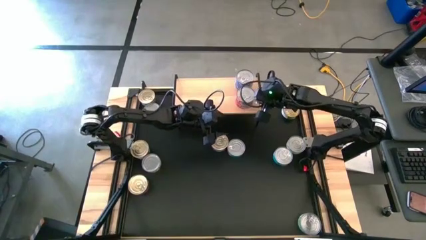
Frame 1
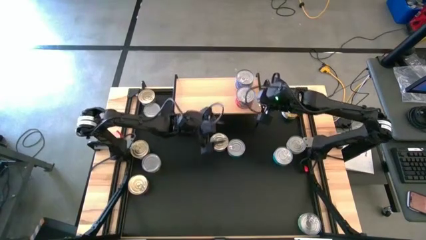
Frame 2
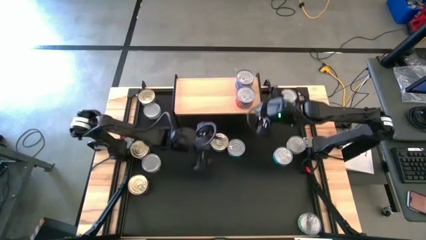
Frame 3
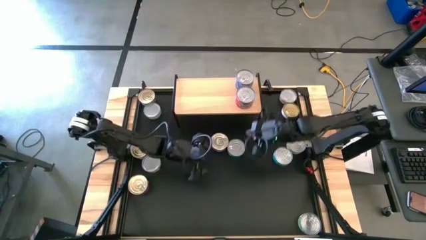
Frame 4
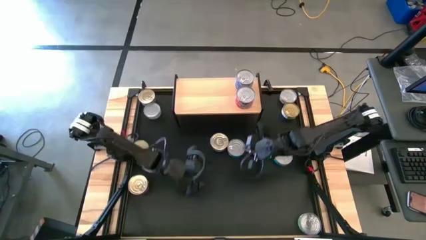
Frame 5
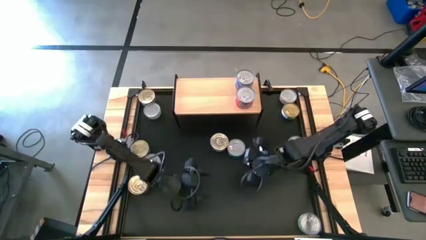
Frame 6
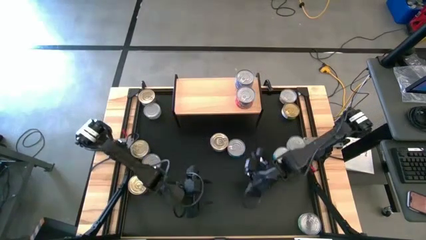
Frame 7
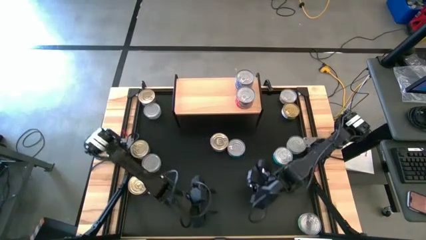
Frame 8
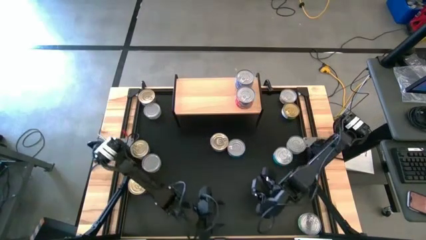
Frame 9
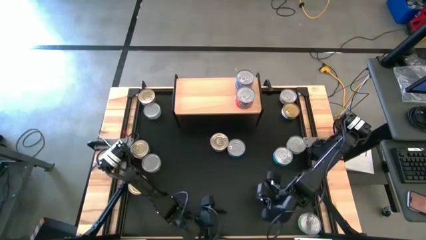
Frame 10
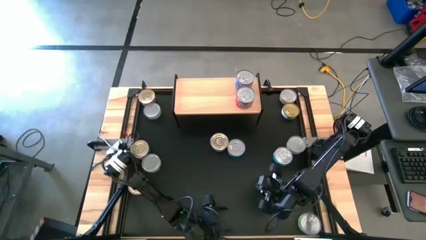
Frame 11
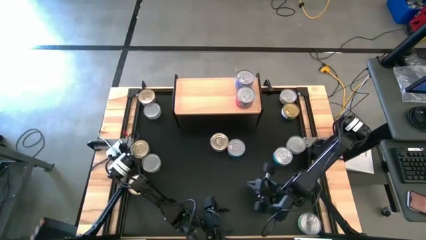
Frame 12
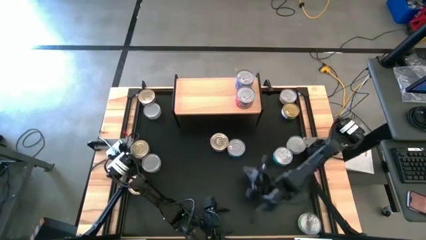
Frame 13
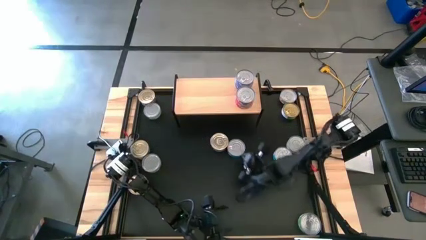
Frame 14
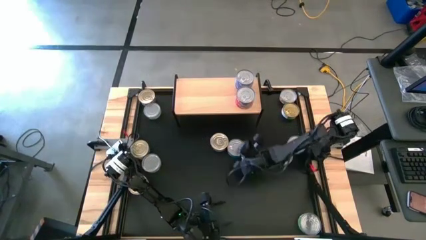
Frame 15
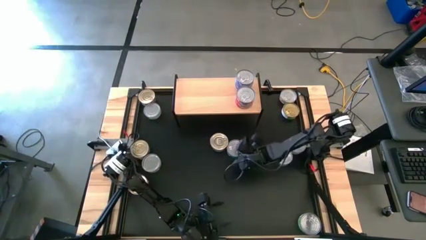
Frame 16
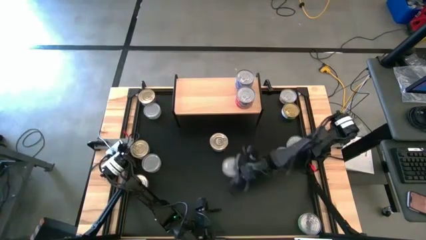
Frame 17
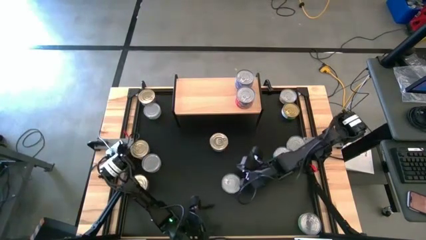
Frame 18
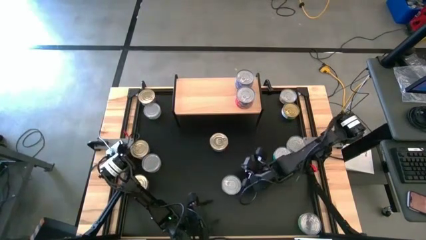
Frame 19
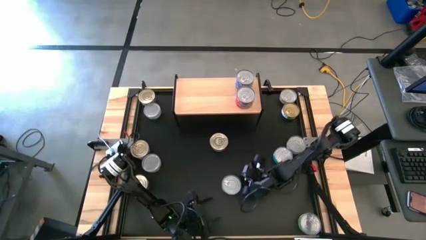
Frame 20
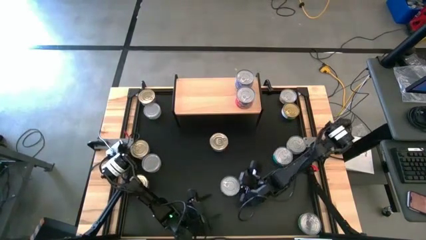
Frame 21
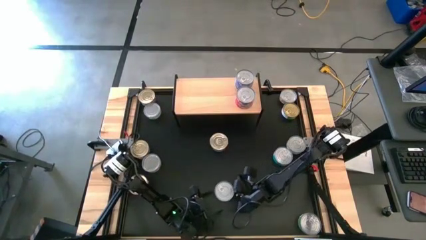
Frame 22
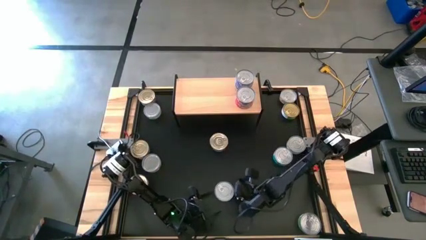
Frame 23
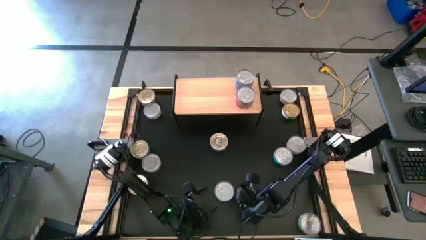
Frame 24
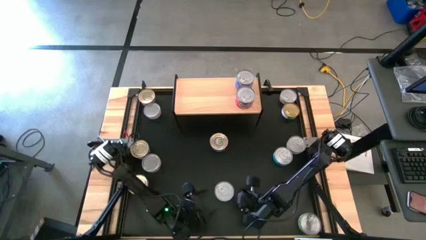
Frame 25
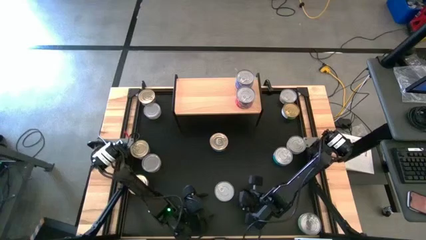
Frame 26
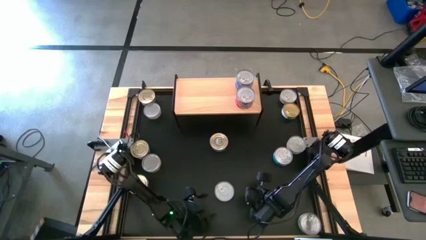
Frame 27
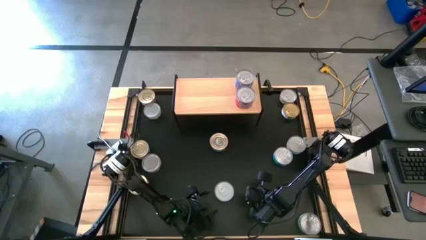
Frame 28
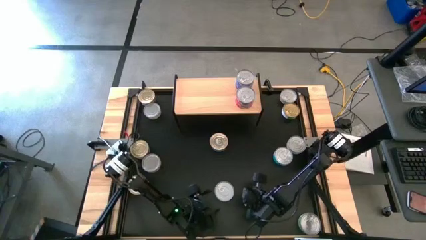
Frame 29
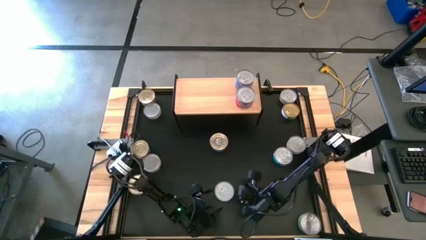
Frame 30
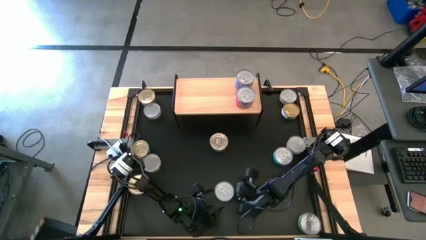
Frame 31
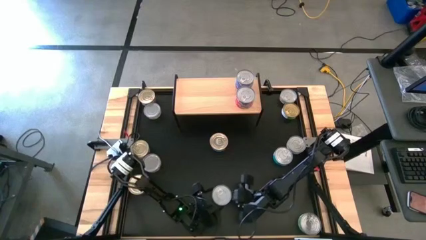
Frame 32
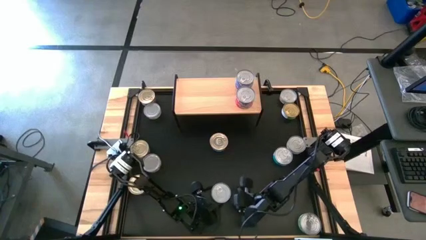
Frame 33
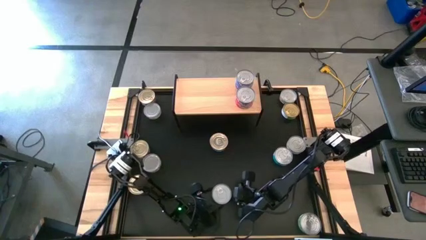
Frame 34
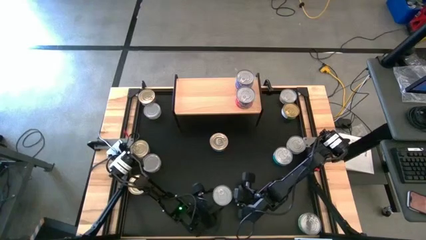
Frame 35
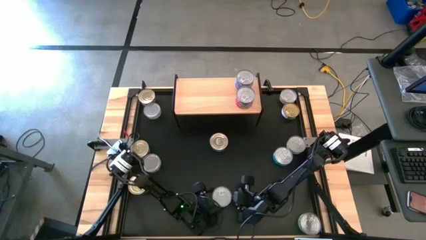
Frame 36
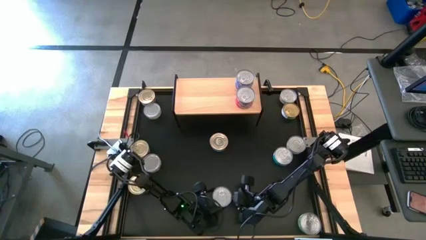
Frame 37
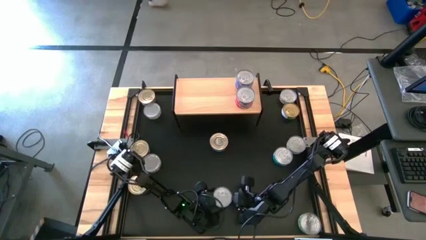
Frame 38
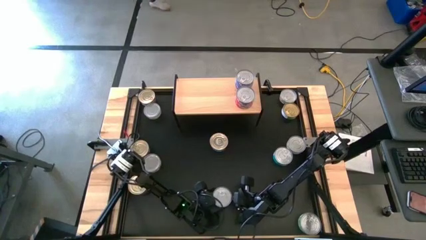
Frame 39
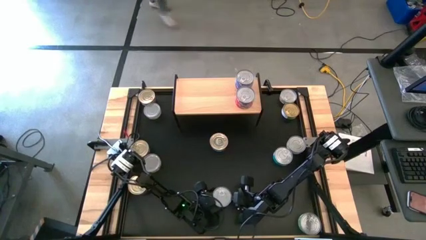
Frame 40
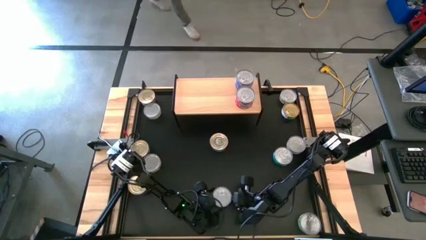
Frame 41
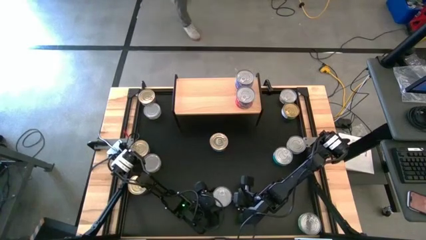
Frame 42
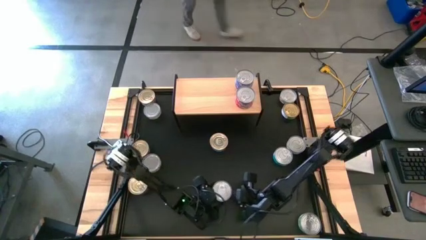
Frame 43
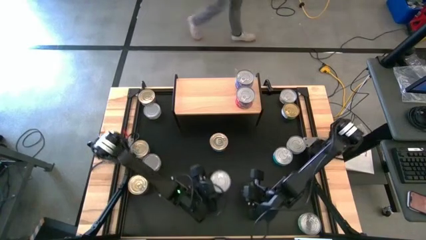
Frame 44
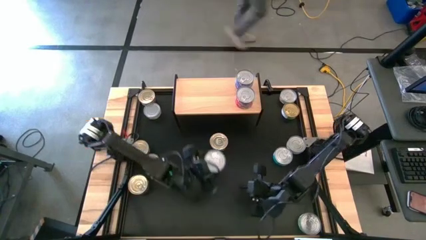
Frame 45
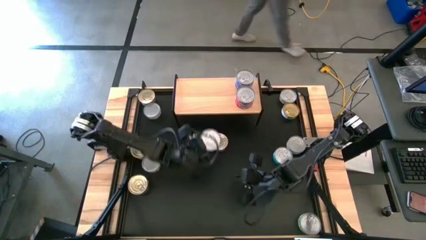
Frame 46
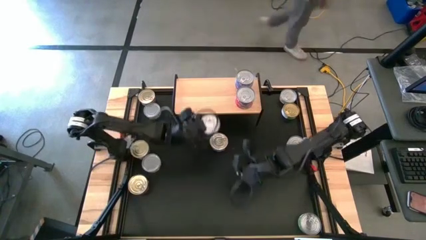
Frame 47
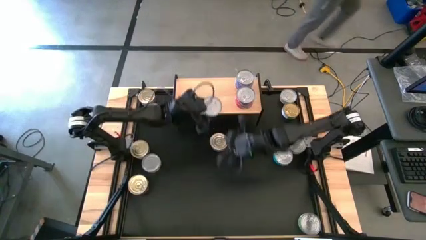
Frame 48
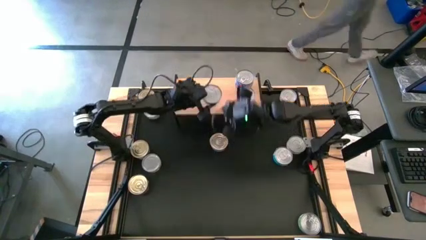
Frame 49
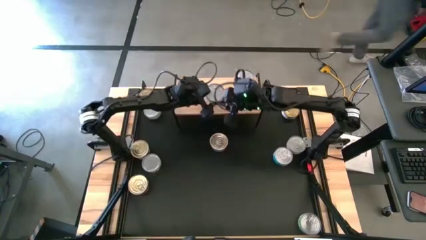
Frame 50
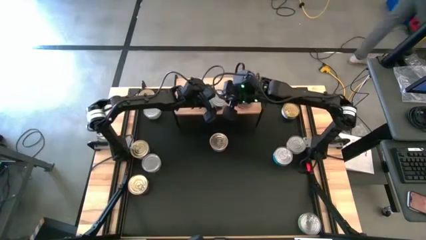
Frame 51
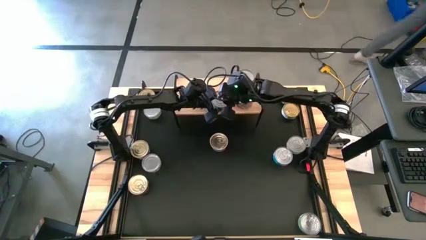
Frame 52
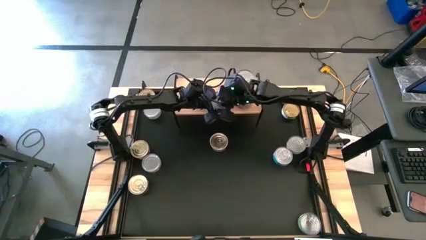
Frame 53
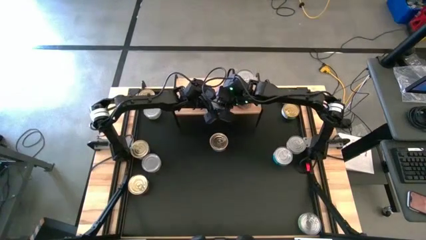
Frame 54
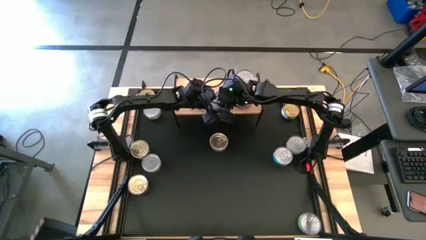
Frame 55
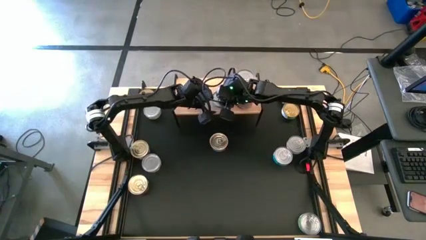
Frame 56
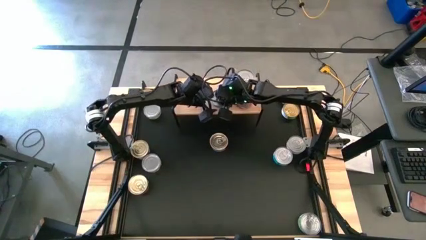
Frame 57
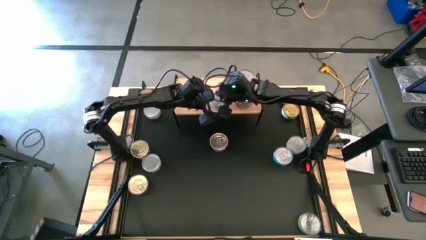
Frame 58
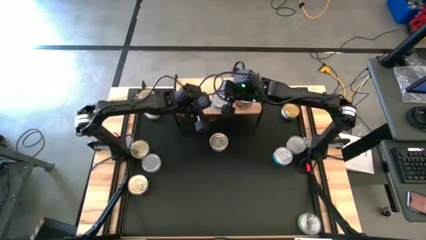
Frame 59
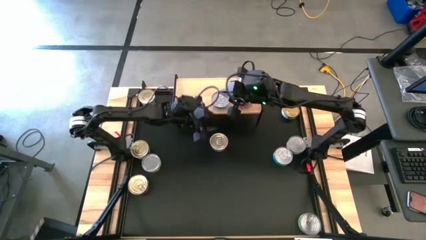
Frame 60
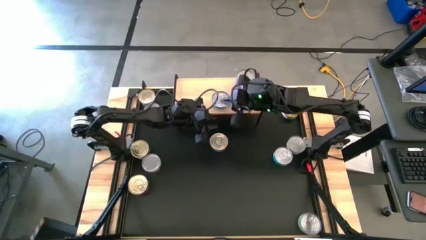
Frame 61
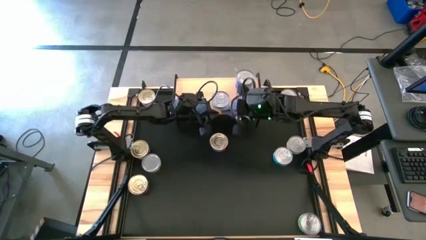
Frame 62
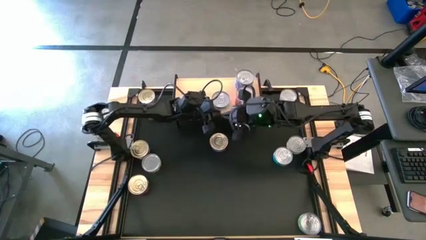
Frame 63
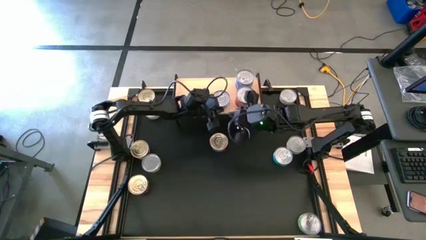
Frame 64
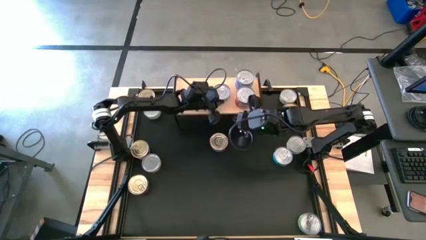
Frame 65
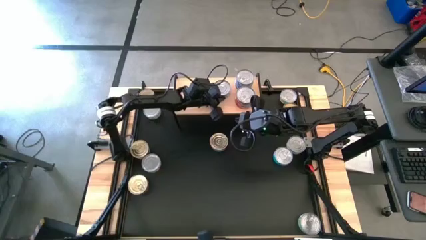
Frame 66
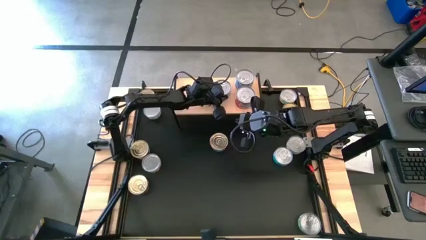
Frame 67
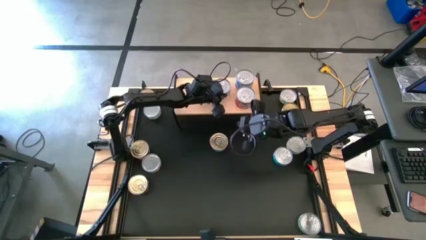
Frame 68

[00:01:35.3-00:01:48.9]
Task: Stack canned seafood by type on shelf
Put the green blue tuna can on the shelf
